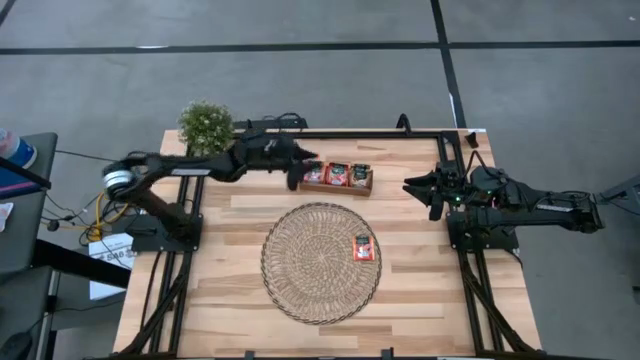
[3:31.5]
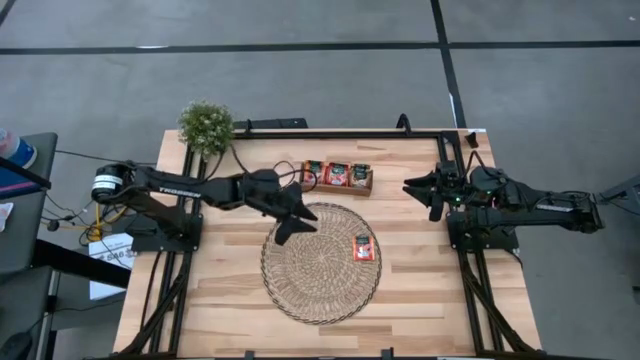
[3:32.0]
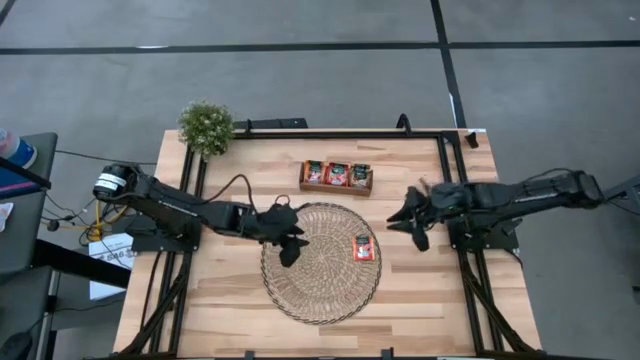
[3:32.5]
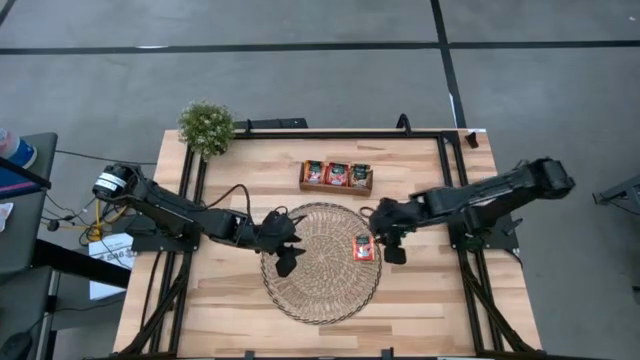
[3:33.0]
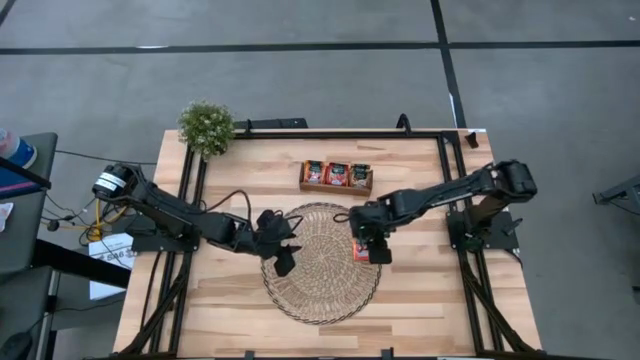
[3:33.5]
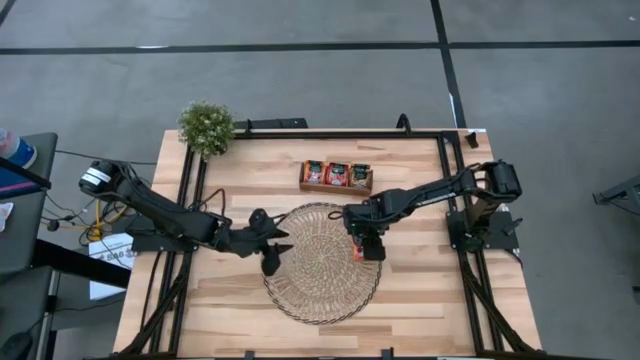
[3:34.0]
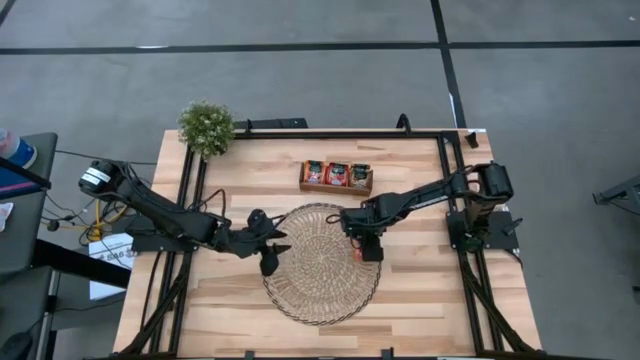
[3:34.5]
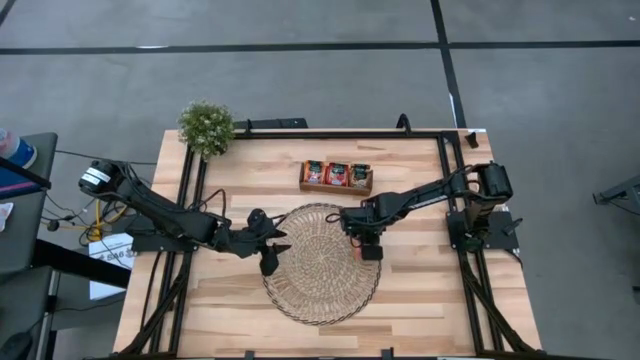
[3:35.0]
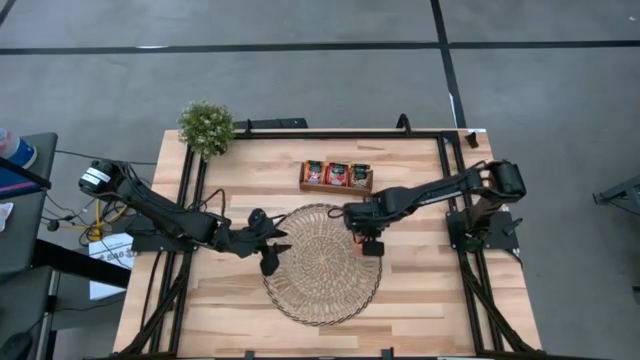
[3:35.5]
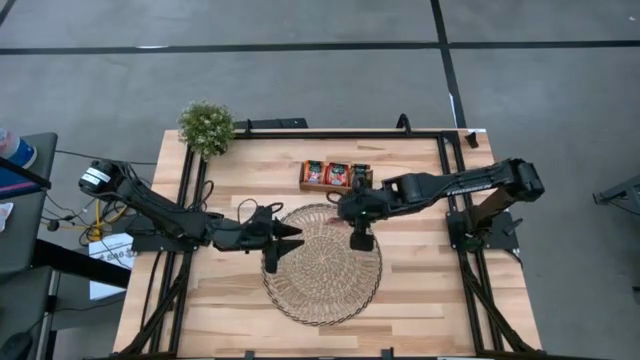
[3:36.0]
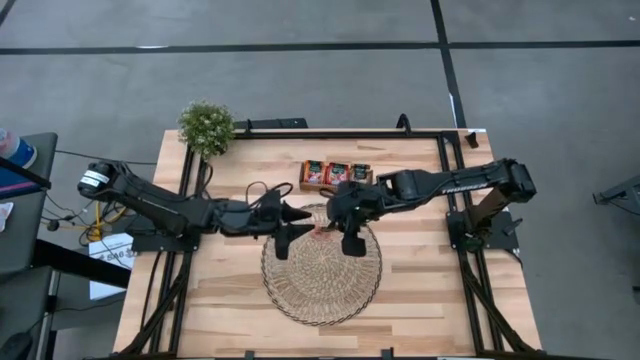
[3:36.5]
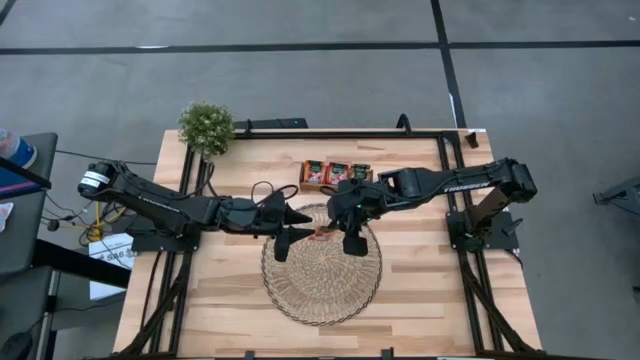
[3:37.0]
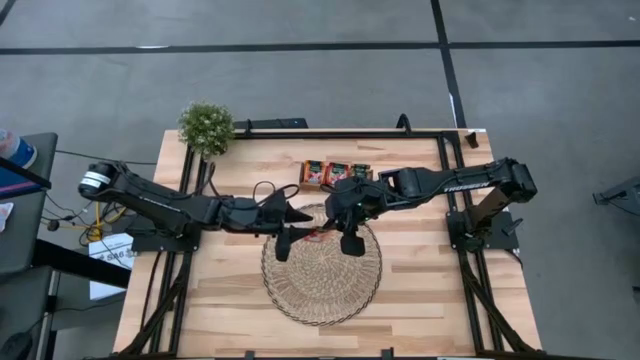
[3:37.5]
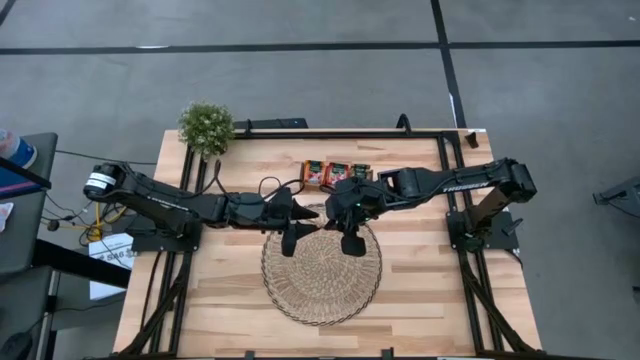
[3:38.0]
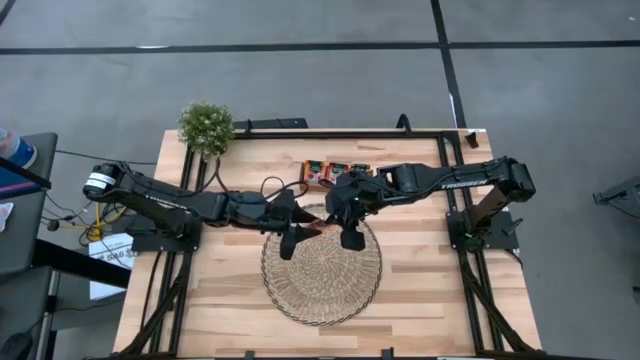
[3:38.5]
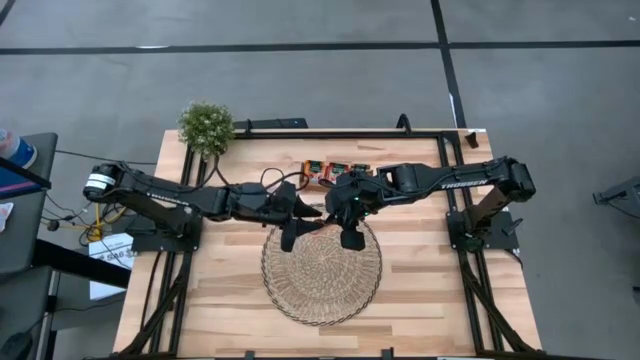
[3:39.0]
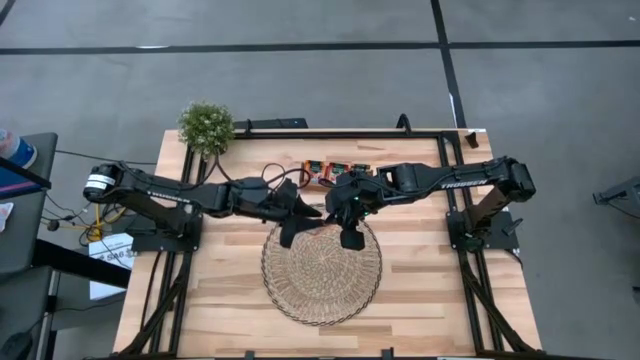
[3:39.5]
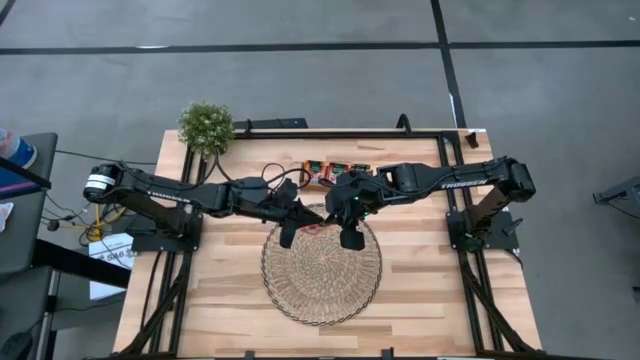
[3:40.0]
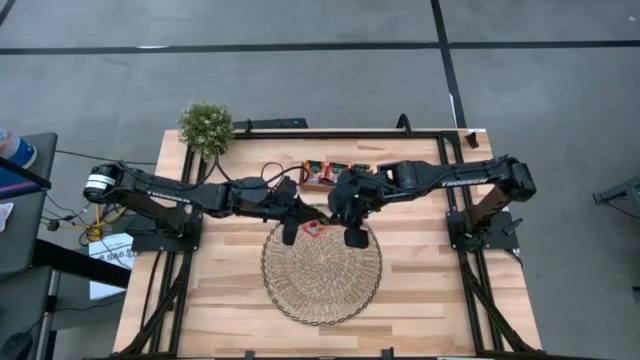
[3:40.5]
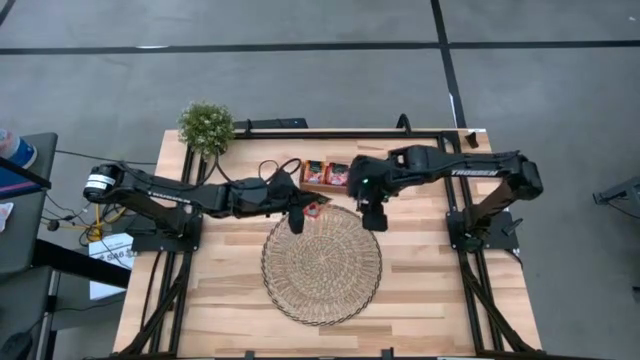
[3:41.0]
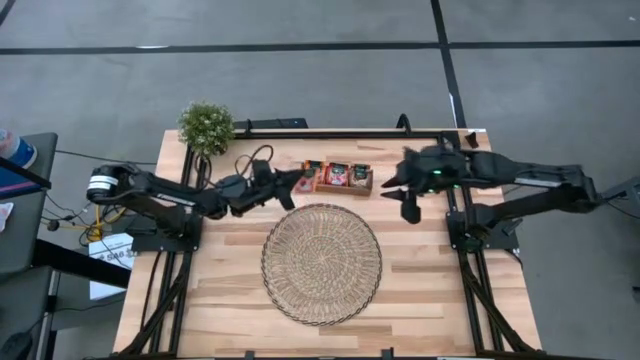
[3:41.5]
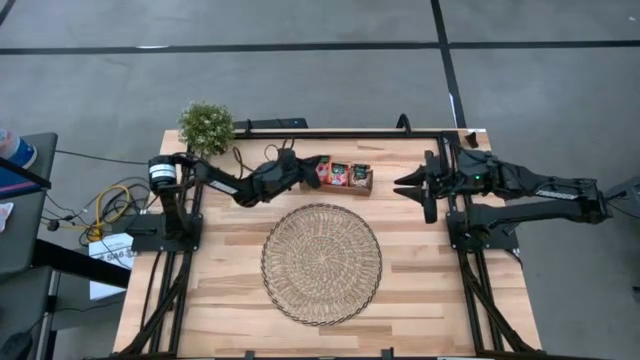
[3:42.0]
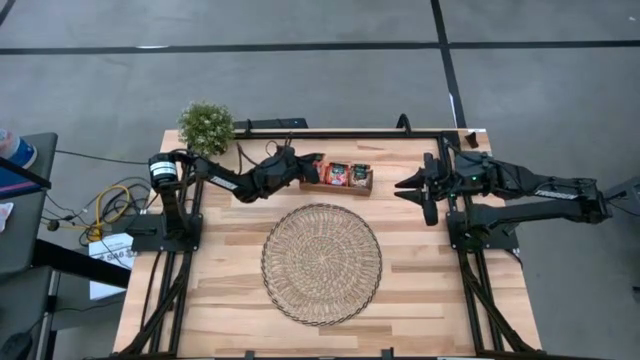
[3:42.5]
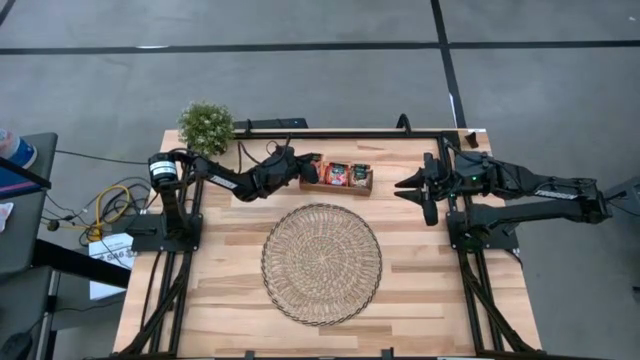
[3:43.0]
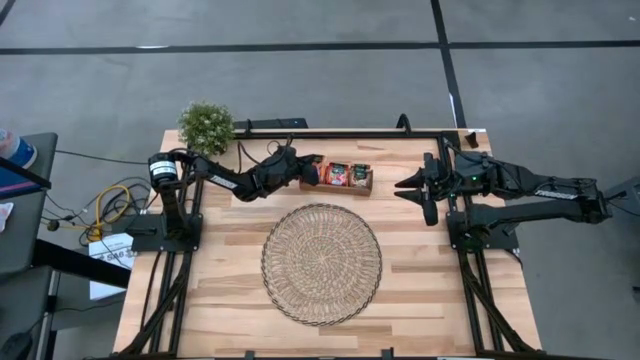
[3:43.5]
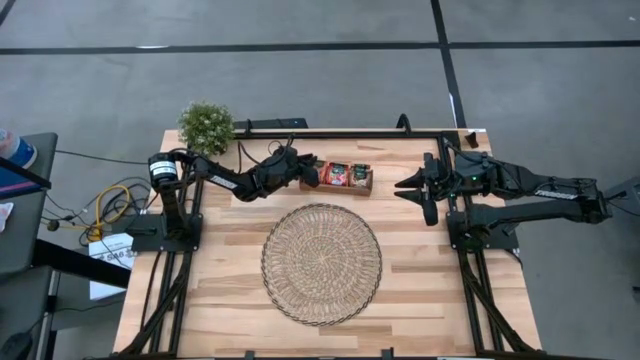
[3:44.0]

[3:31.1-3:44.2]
Task: Pick & Place Tea
Put the orange tea bag into the left section of the wooden organizer

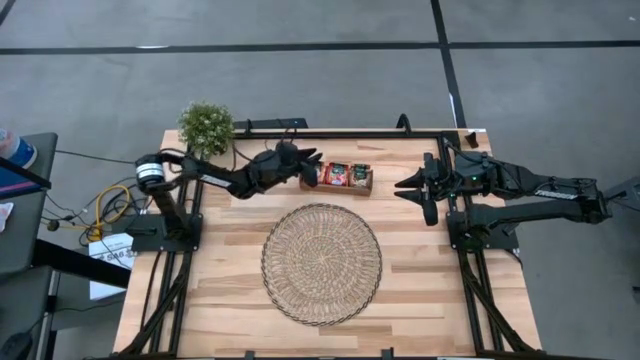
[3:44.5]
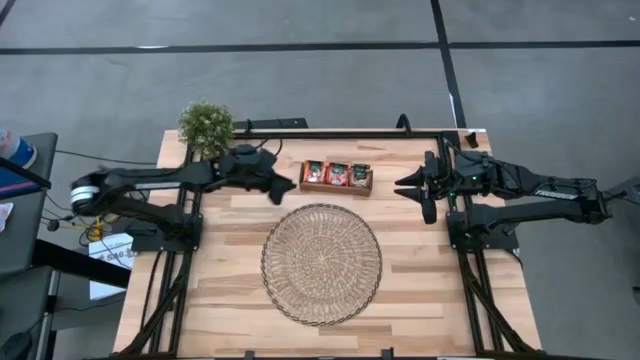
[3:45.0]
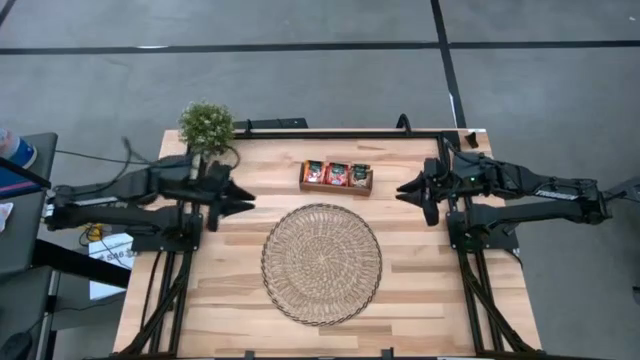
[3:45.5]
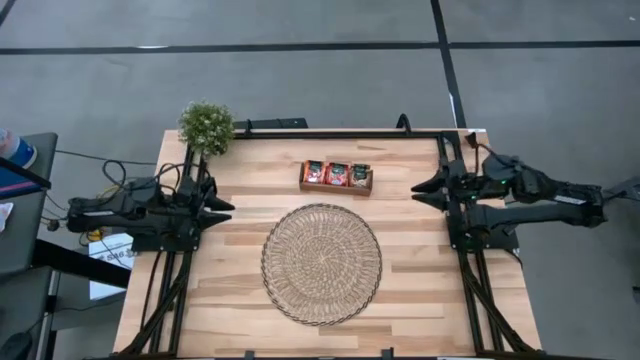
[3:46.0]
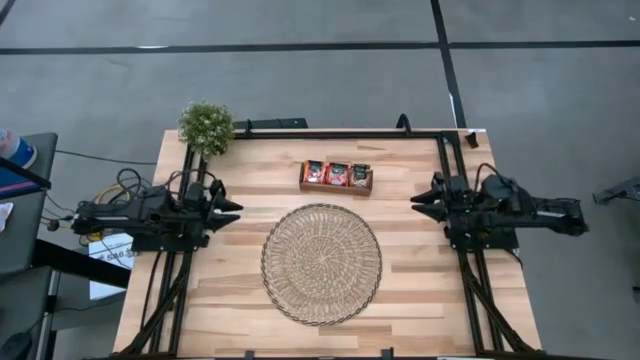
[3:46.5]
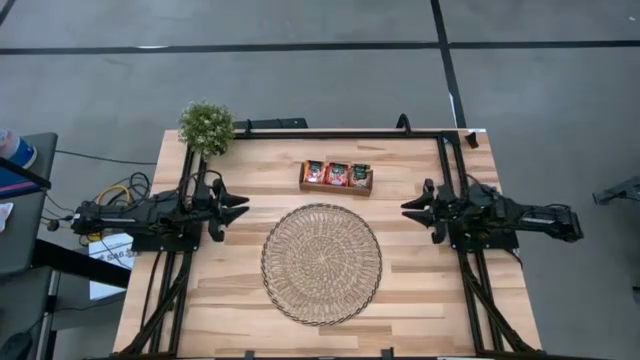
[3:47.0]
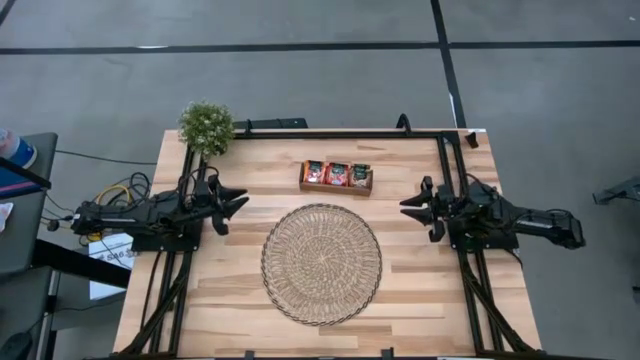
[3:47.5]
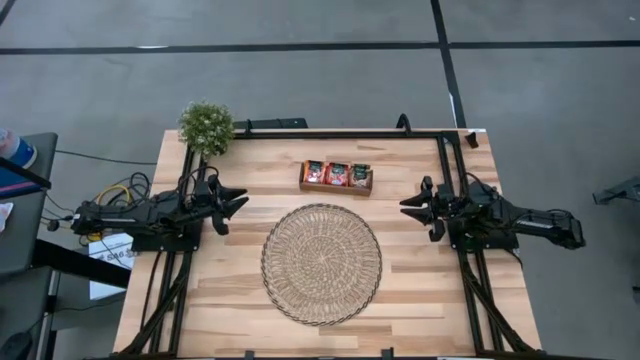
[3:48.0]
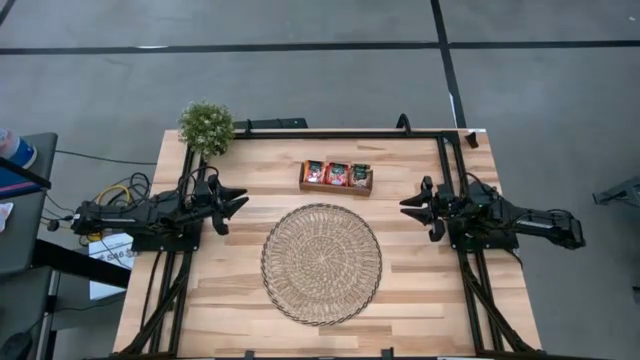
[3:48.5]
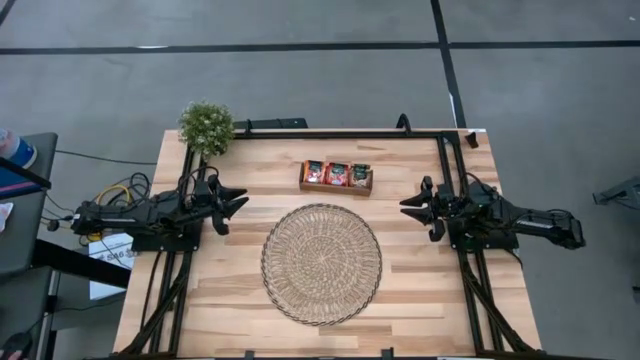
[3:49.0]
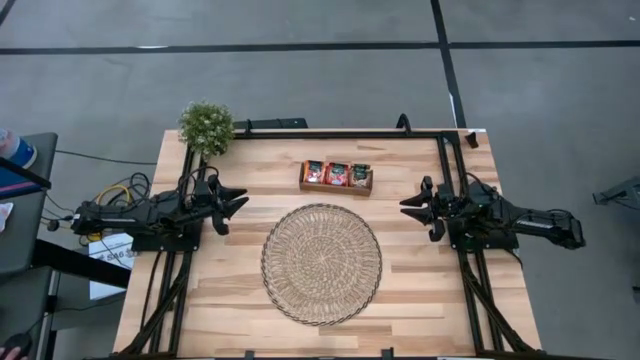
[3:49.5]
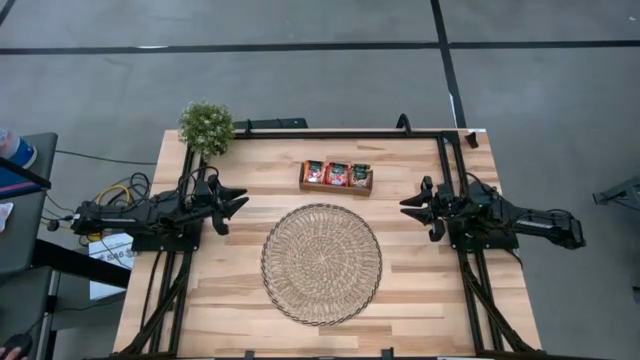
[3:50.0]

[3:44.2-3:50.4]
Return to Home Position

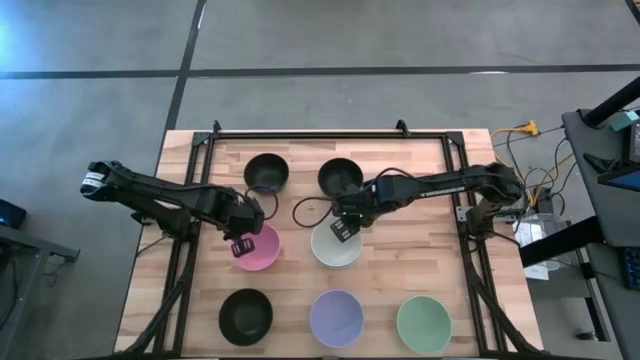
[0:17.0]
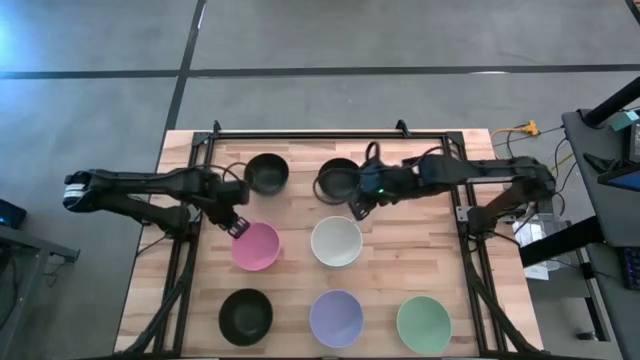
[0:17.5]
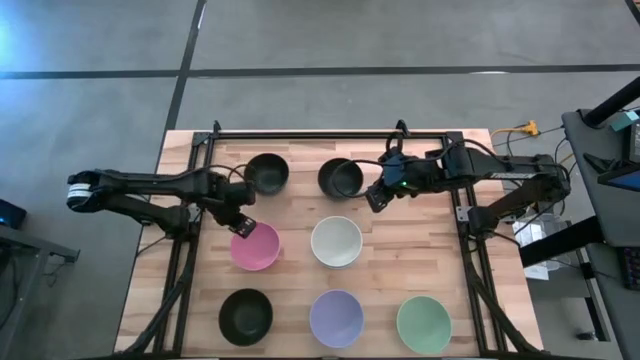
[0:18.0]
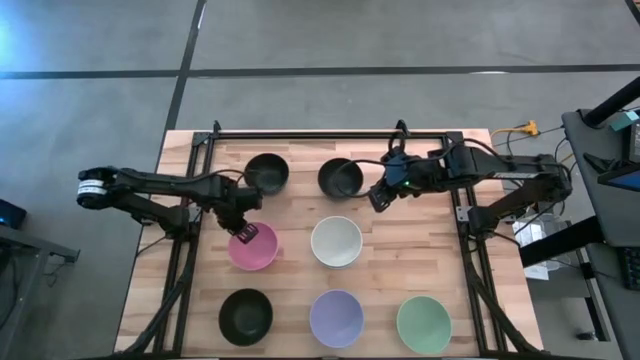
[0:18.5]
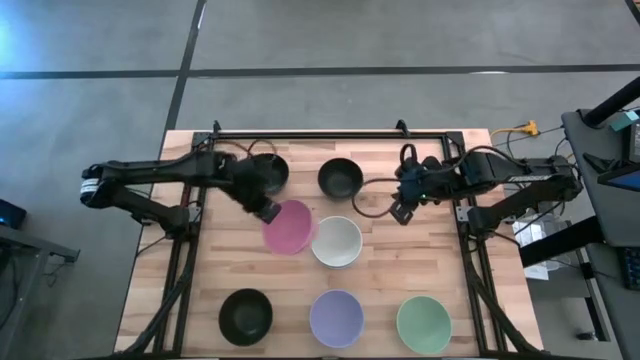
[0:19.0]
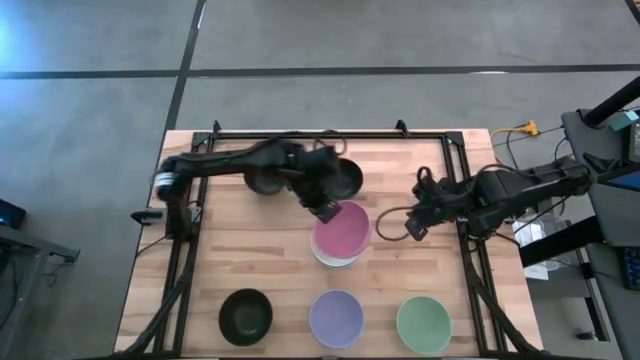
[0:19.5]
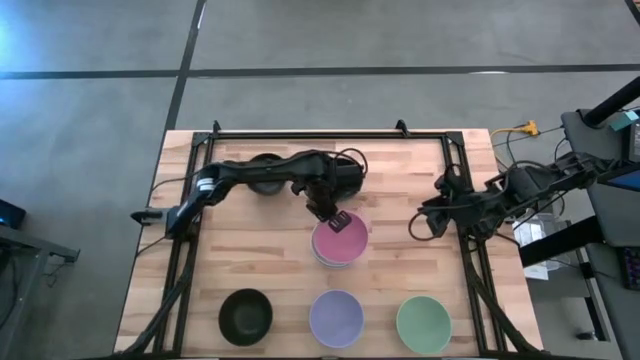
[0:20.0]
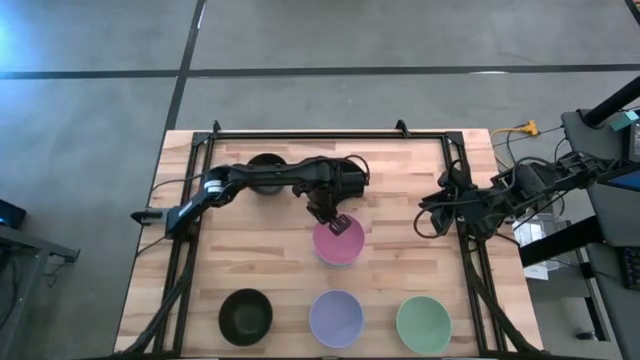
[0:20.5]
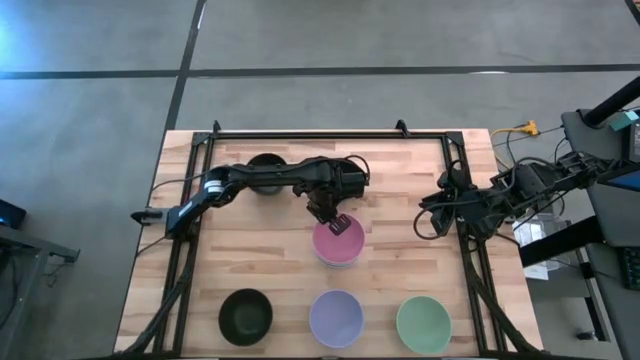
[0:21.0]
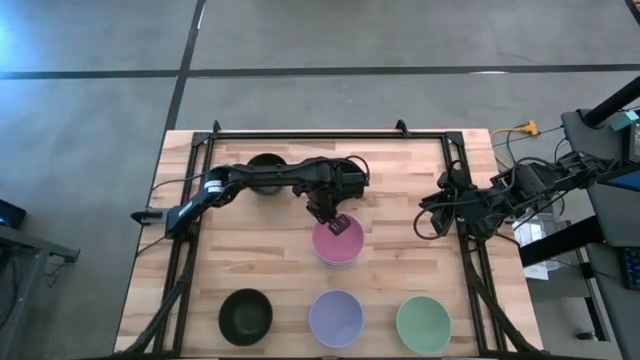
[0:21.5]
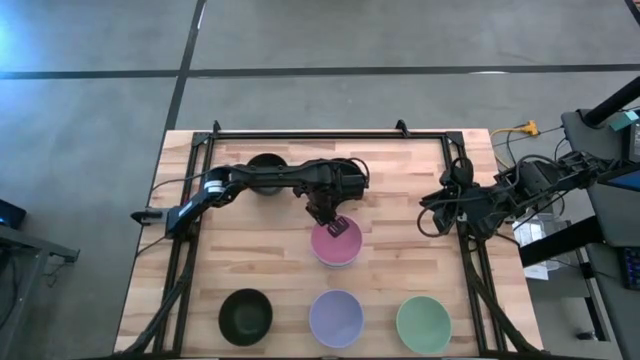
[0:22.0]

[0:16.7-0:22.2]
Task: Nest bowls inside each other
Stack the pink bowl on top of the white bowl
